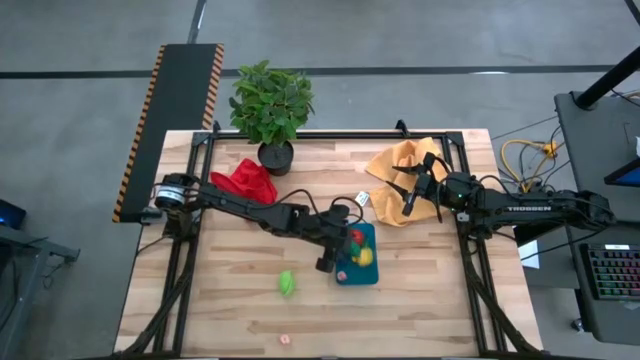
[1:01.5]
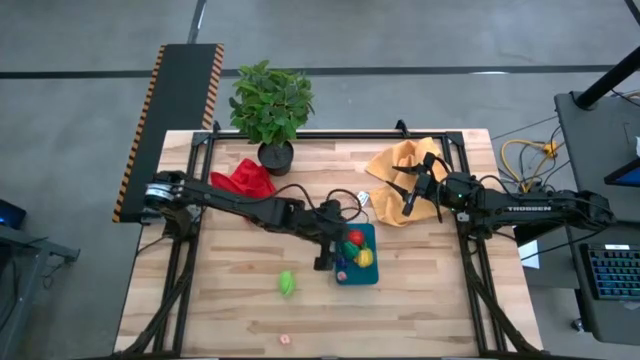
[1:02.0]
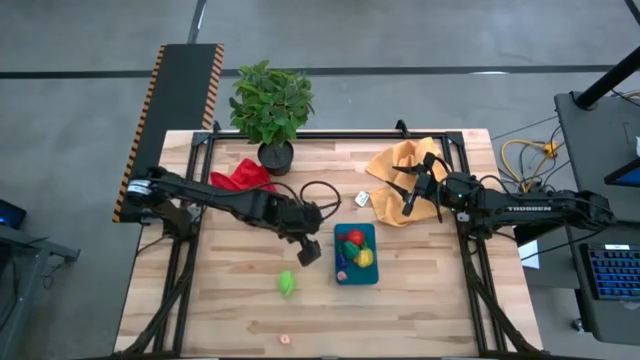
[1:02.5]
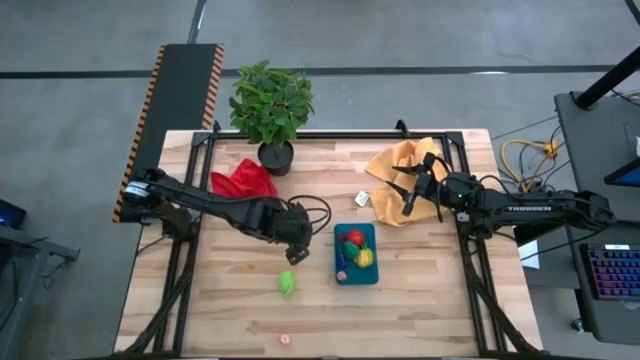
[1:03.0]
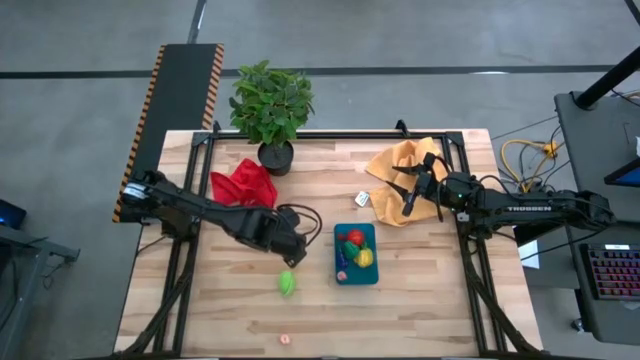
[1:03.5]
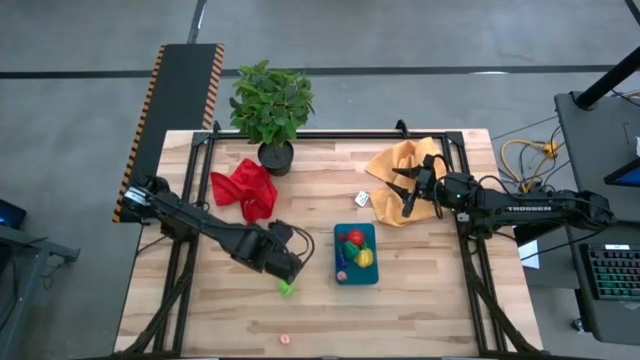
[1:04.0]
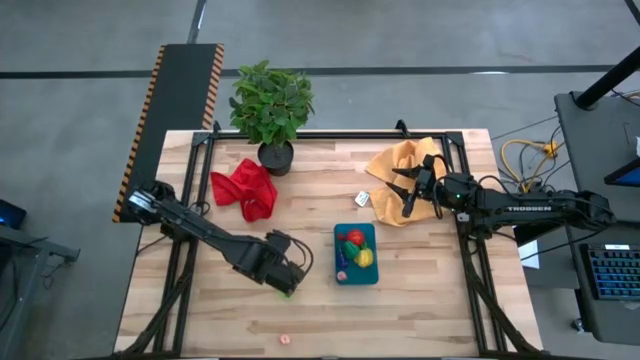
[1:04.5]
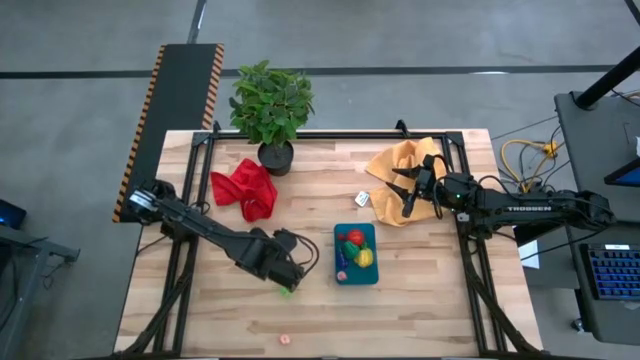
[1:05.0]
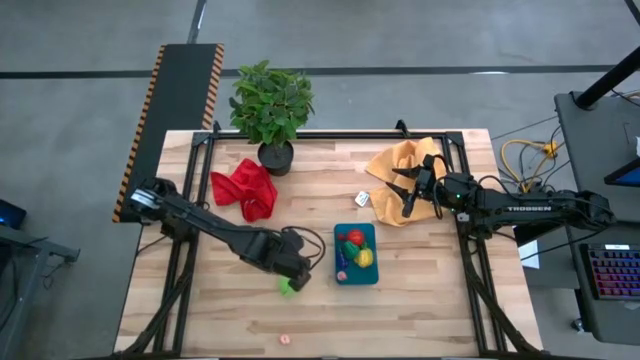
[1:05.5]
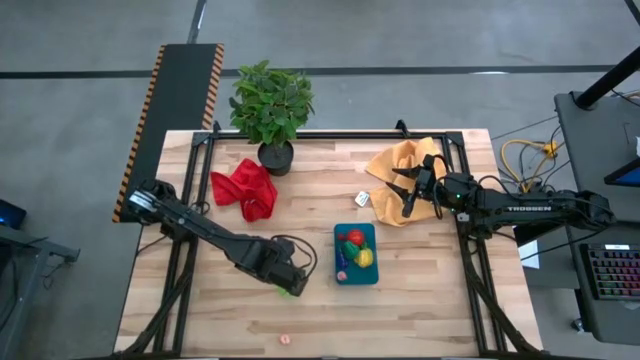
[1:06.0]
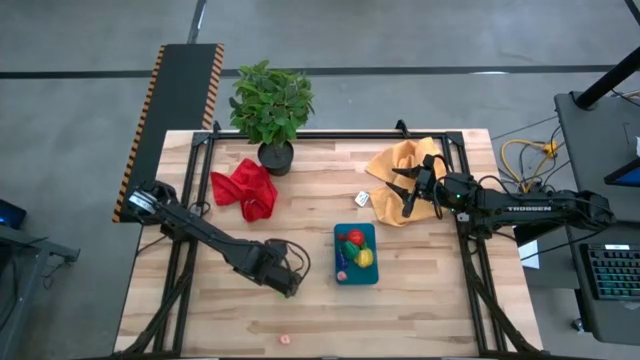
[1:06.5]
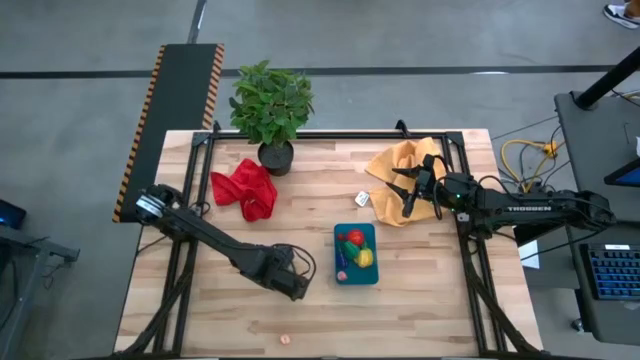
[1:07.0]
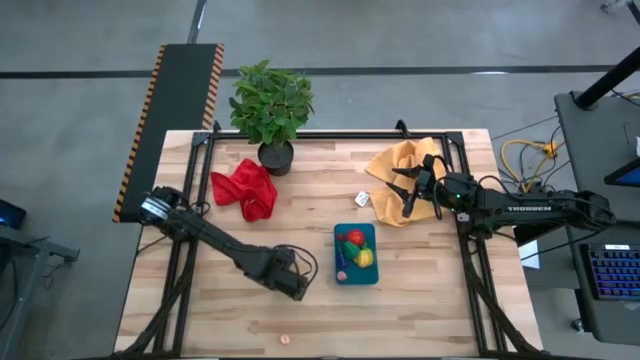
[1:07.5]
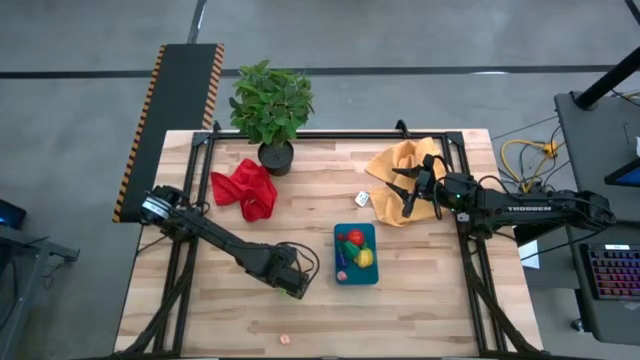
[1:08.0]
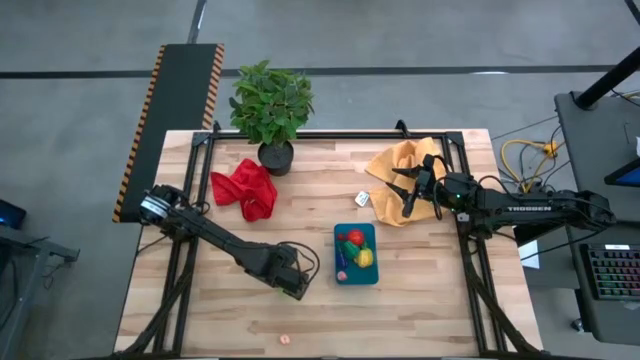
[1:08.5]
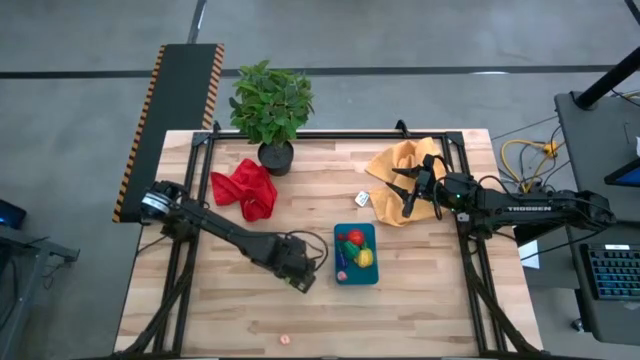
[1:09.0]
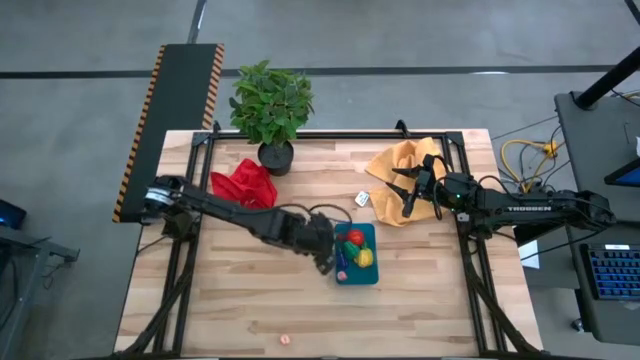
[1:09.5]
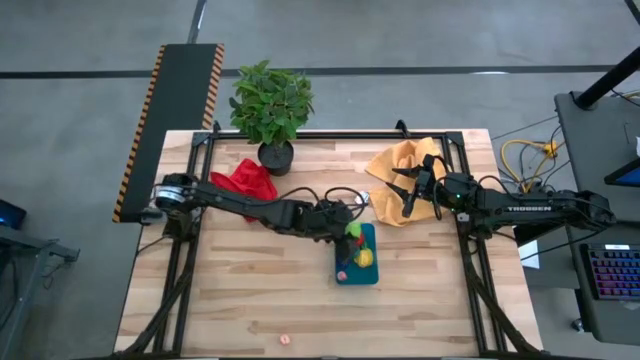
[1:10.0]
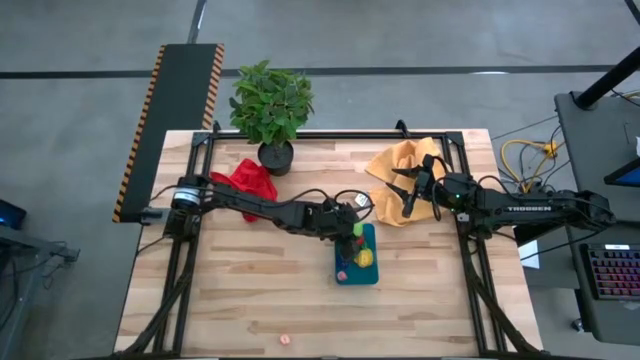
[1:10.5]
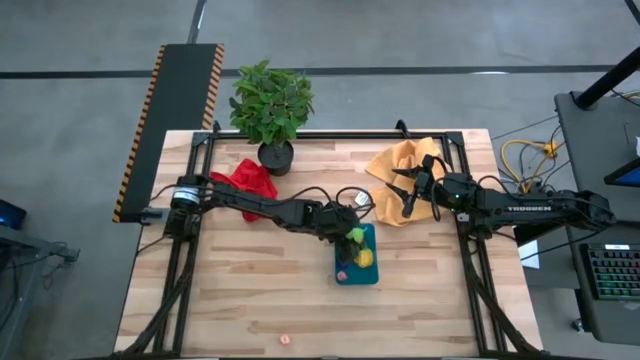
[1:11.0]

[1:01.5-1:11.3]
Task: Pick and placing Produce into tupperware
Put the green melon into the blue bin

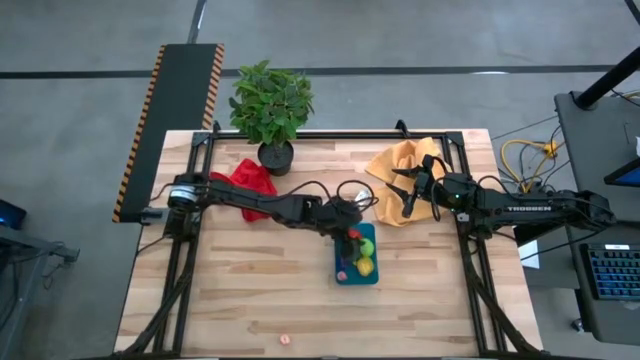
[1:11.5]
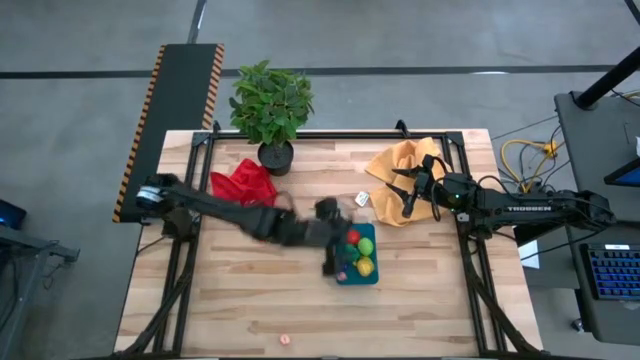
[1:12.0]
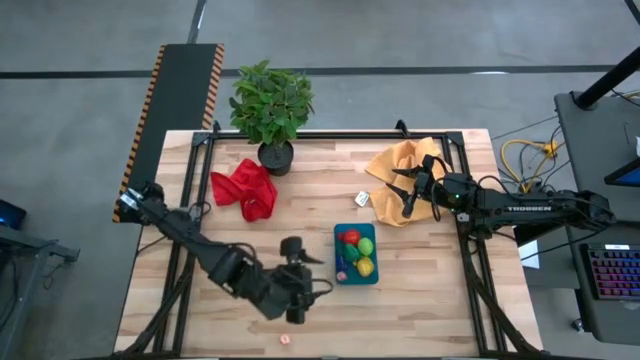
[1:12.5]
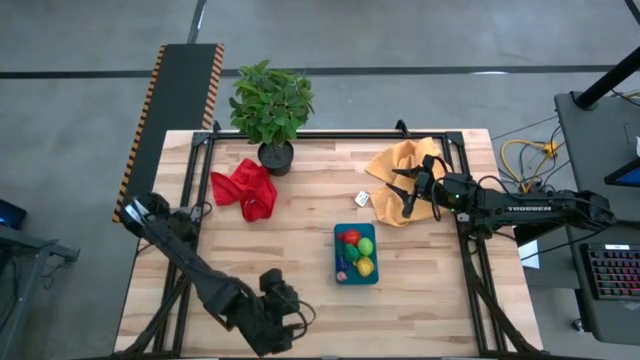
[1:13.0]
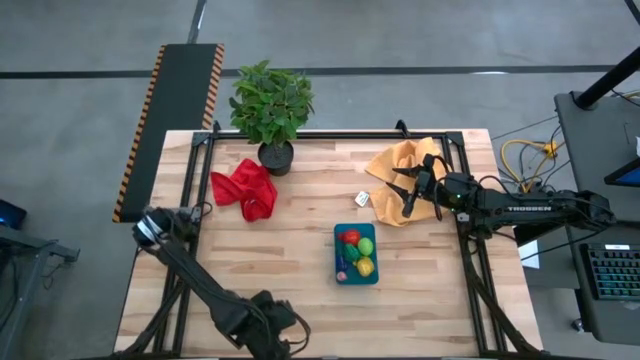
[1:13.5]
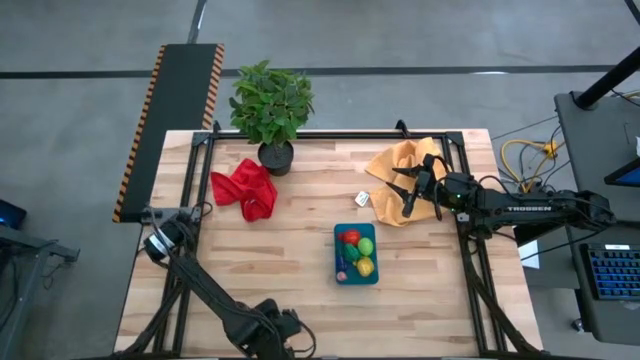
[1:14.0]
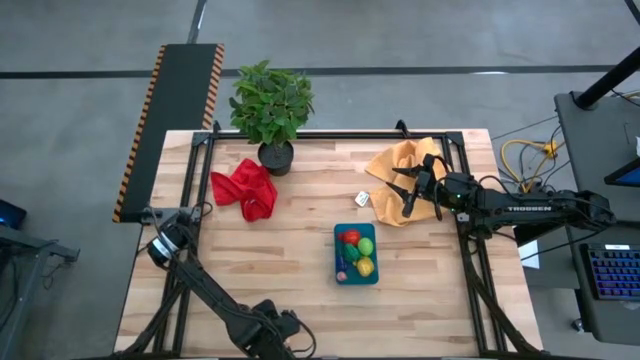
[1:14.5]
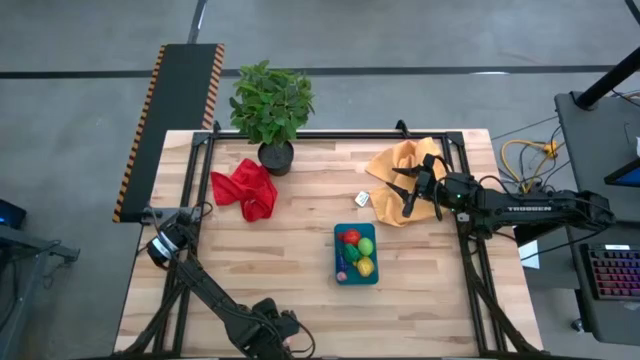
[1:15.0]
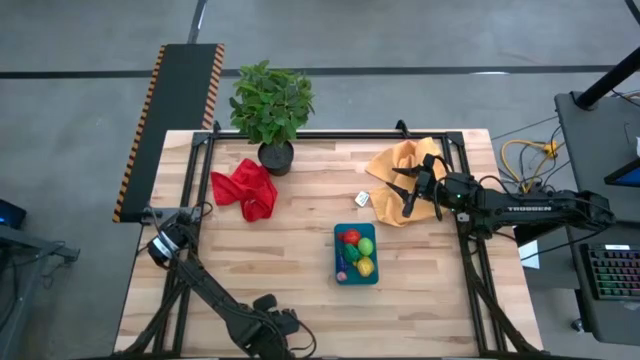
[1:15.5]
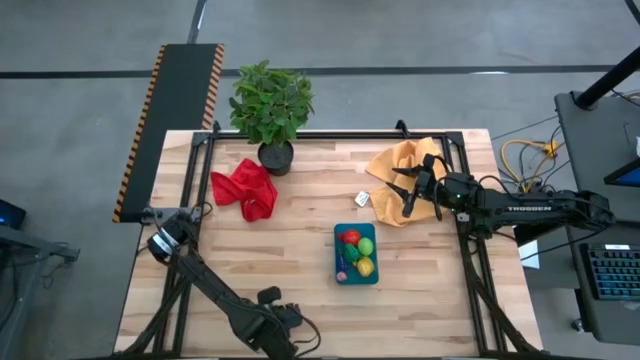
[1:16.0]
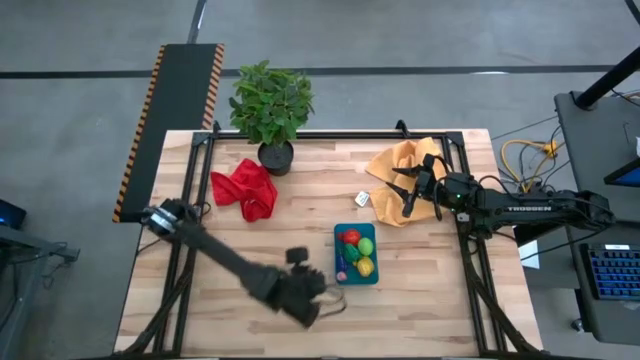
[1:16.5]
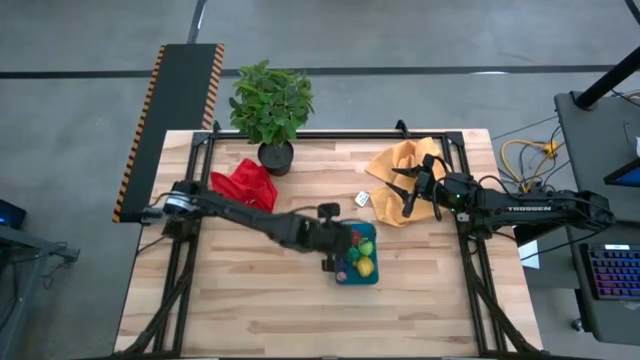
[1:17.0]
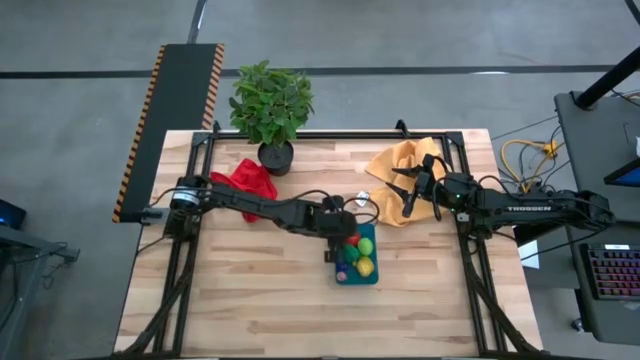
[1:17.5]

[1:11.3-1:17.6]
Put the pink peach into the blue bin

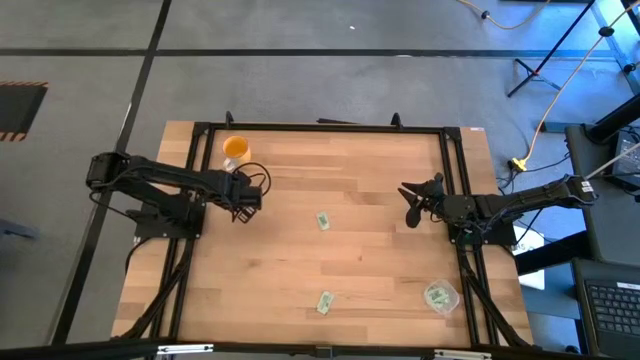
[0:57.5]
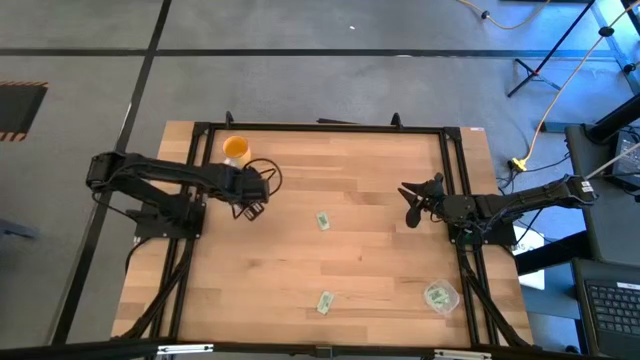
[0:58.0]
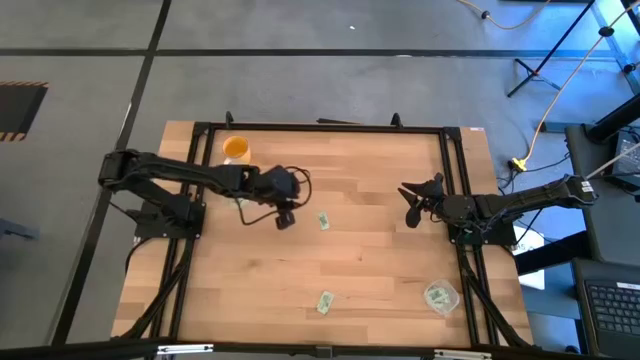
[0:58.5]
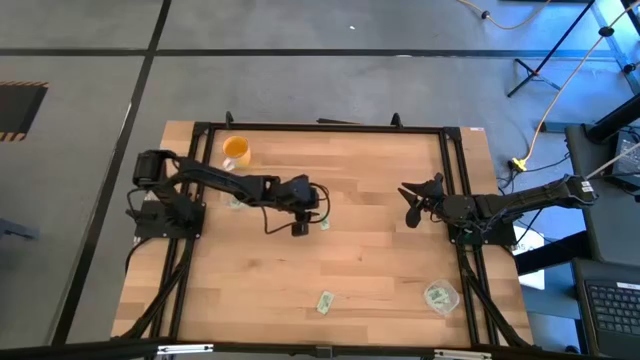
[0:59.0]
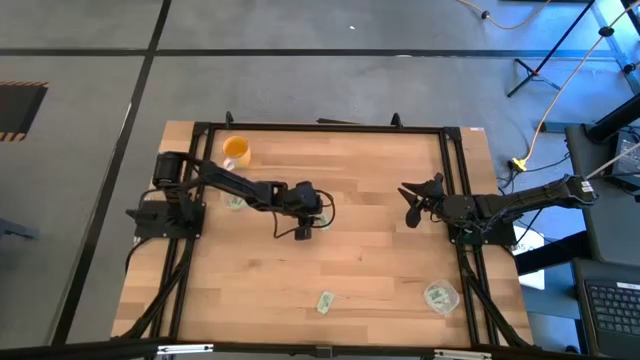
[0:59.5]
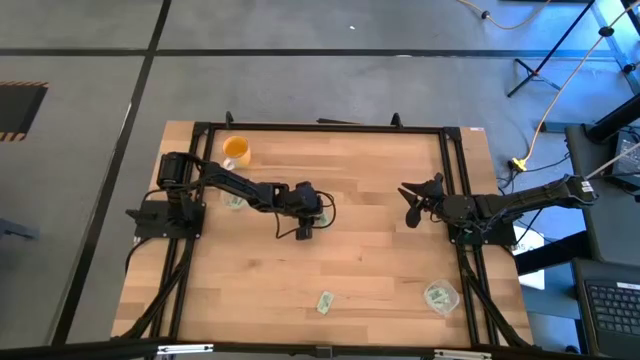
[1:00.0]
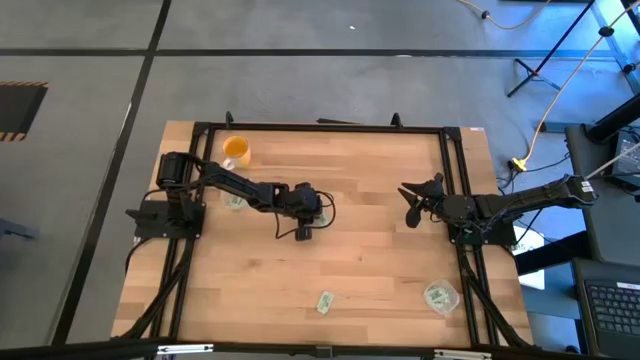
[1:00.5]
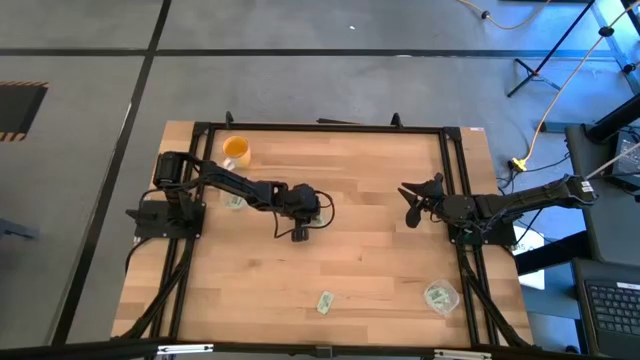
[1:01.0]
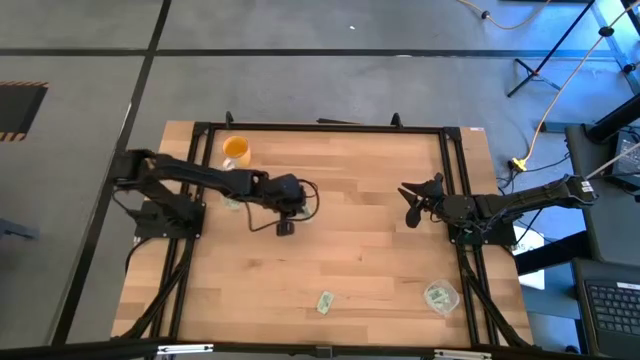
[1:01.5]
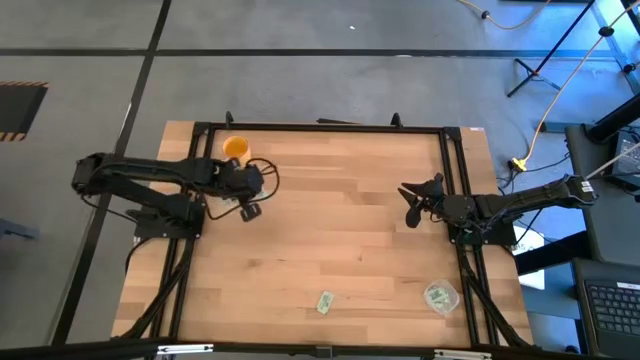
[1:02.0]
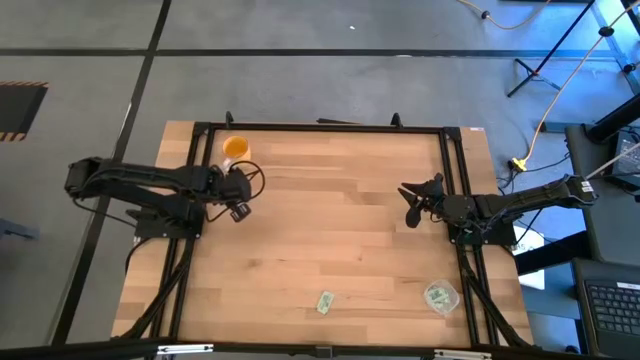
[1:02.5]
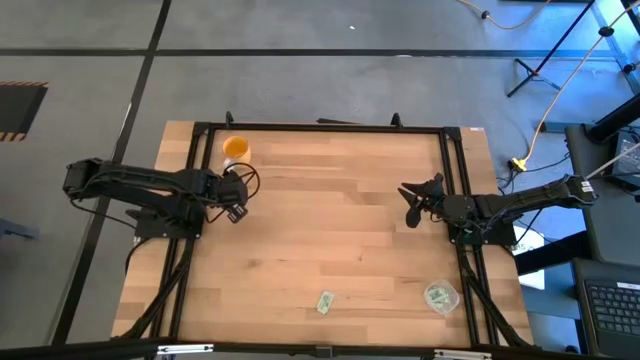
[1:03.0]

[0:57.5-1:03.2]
Task: Pick and place items into bin
Put the green stevia packet into the top transparent bin
